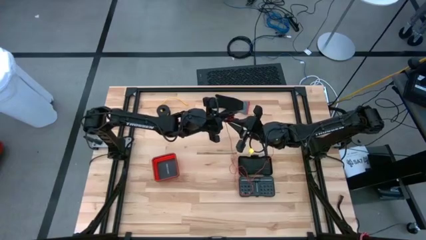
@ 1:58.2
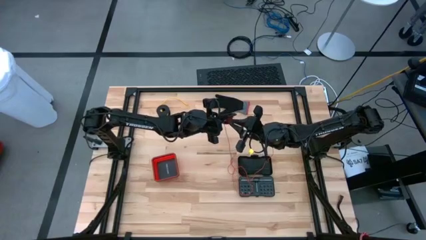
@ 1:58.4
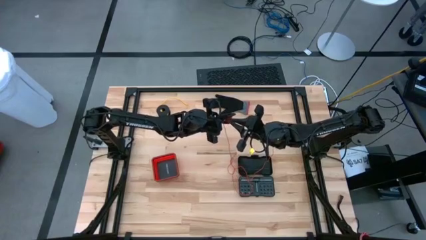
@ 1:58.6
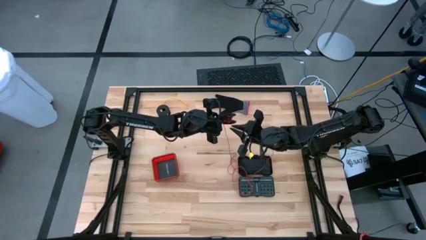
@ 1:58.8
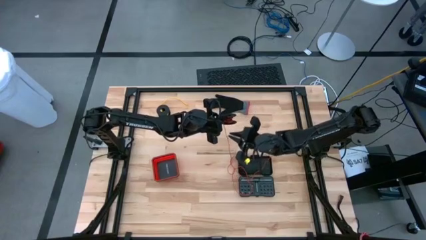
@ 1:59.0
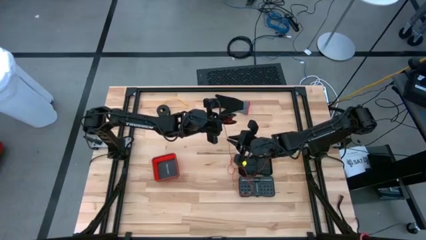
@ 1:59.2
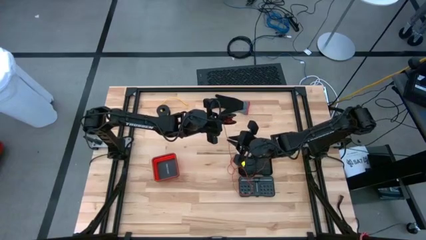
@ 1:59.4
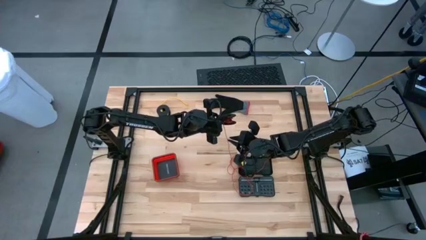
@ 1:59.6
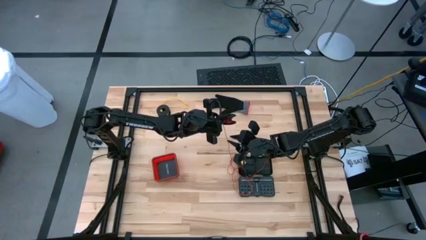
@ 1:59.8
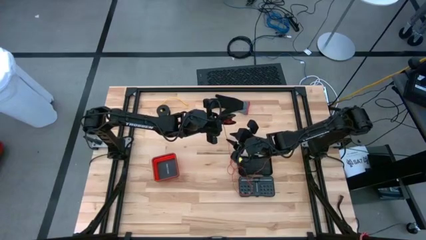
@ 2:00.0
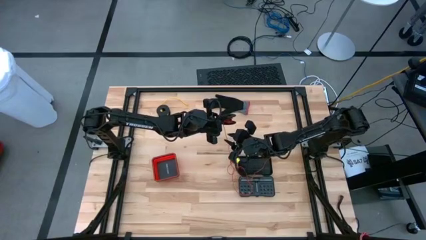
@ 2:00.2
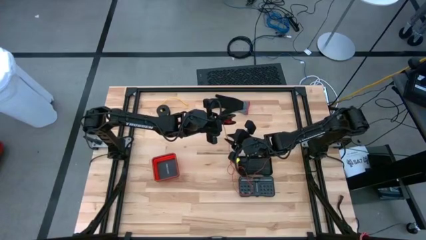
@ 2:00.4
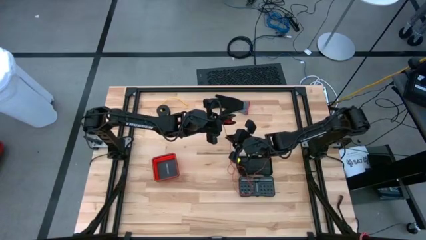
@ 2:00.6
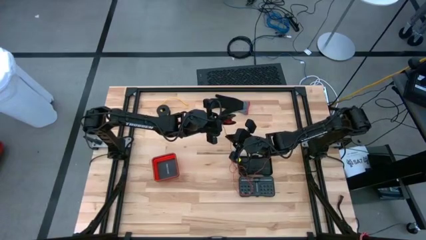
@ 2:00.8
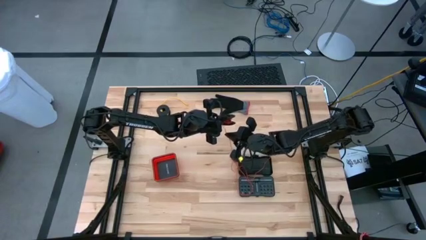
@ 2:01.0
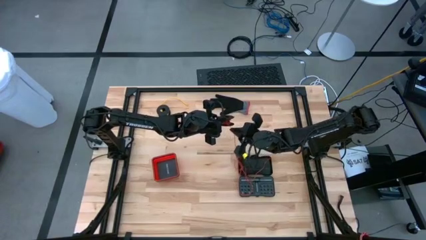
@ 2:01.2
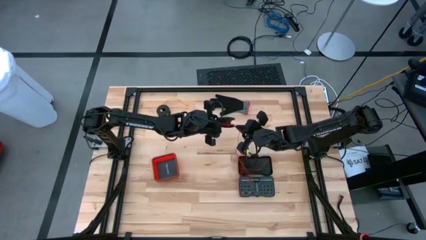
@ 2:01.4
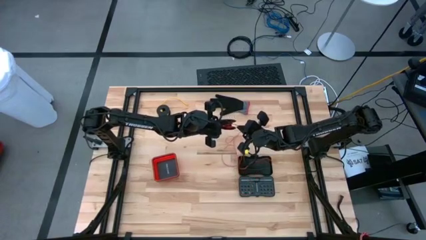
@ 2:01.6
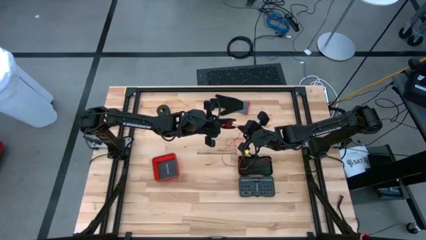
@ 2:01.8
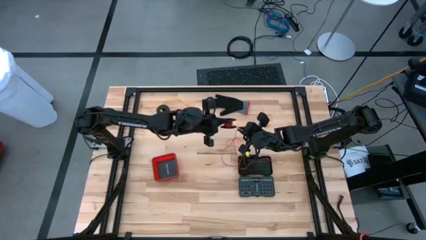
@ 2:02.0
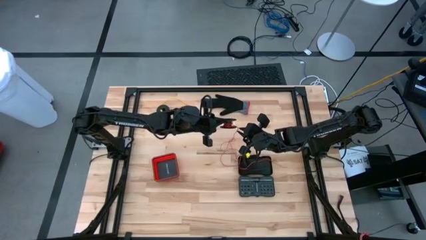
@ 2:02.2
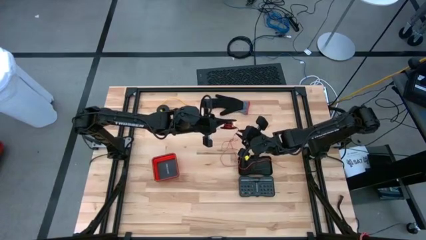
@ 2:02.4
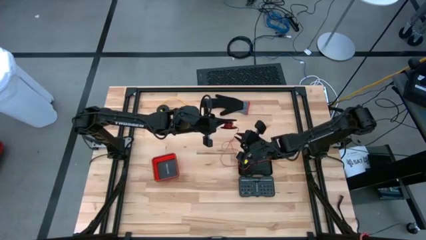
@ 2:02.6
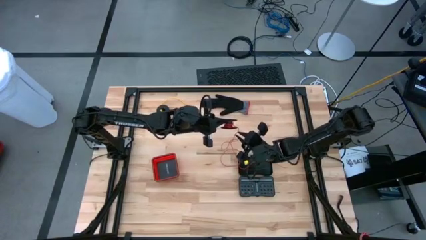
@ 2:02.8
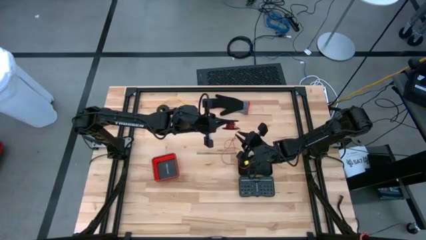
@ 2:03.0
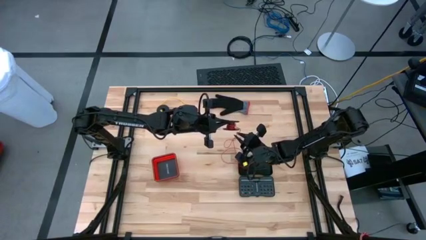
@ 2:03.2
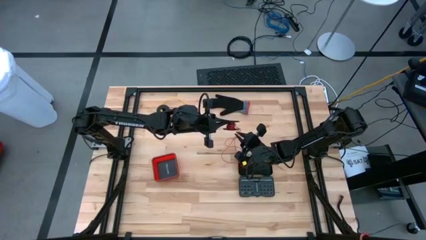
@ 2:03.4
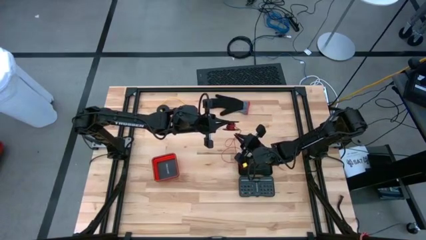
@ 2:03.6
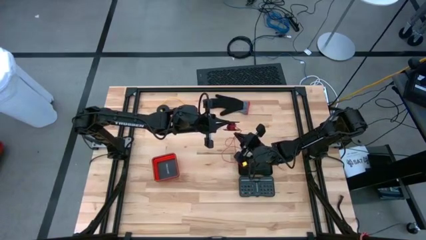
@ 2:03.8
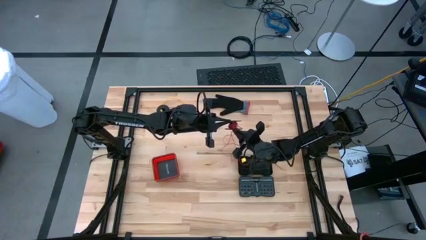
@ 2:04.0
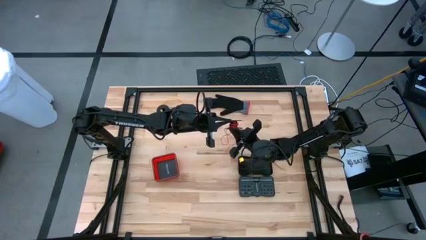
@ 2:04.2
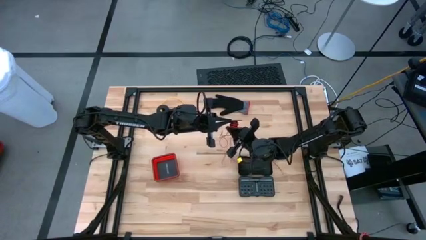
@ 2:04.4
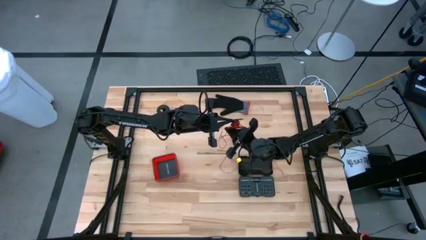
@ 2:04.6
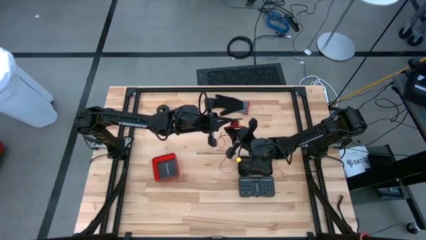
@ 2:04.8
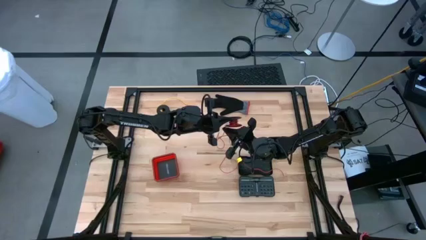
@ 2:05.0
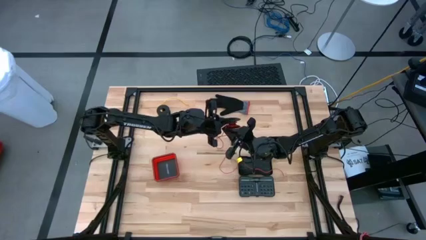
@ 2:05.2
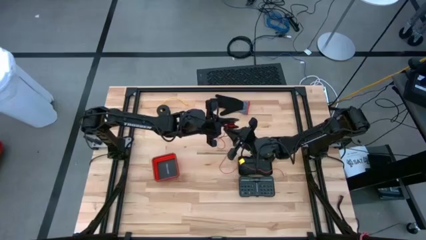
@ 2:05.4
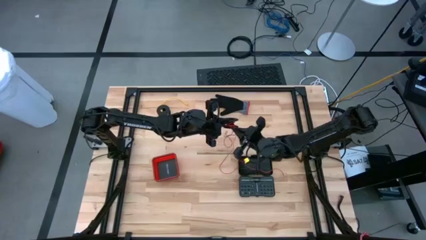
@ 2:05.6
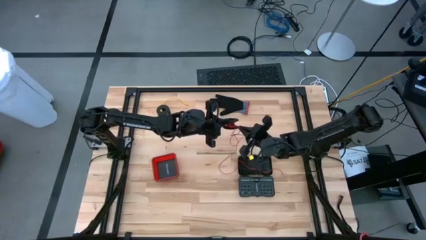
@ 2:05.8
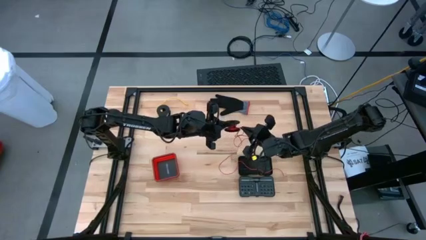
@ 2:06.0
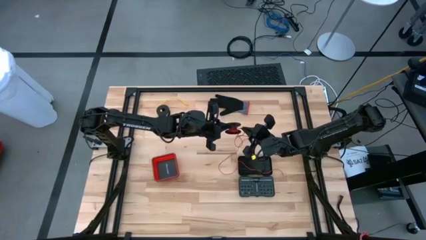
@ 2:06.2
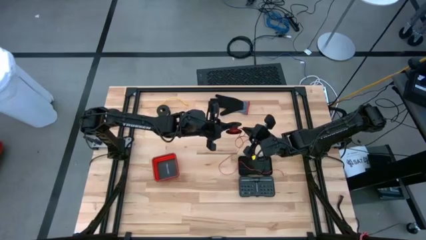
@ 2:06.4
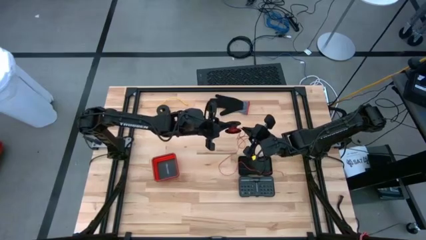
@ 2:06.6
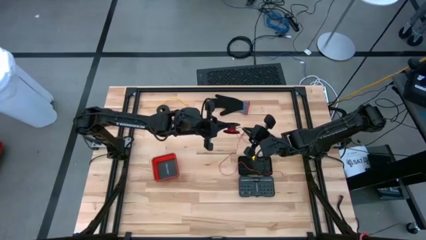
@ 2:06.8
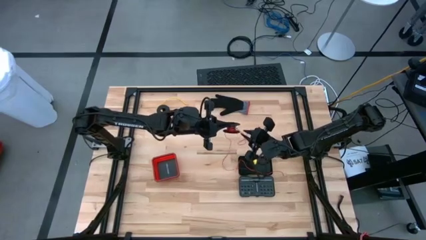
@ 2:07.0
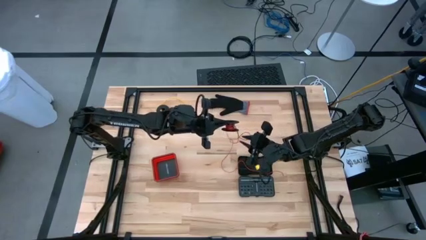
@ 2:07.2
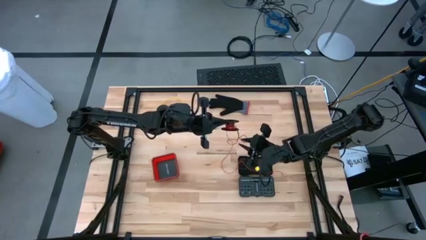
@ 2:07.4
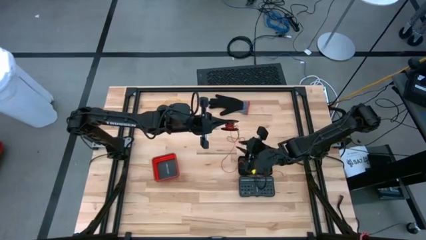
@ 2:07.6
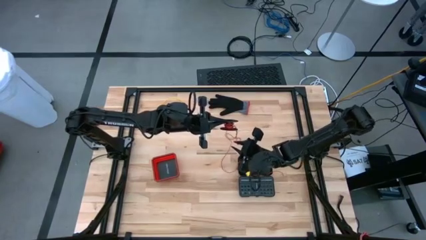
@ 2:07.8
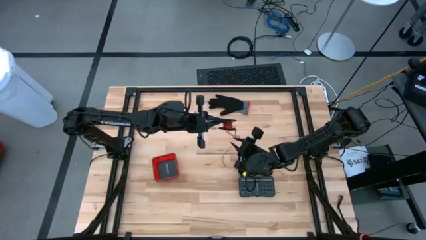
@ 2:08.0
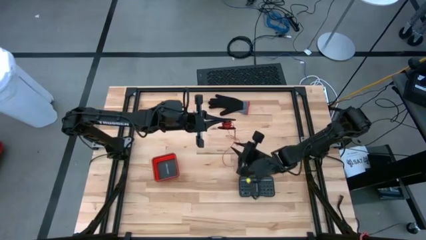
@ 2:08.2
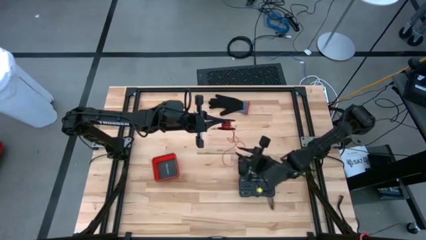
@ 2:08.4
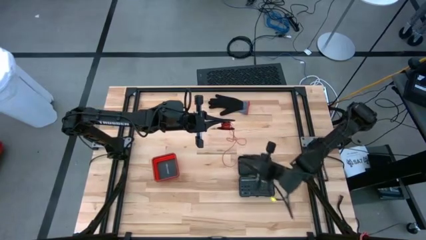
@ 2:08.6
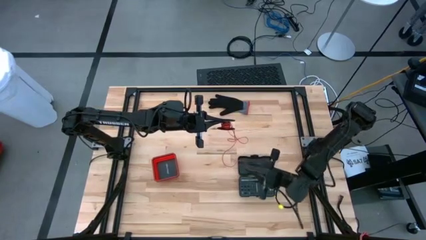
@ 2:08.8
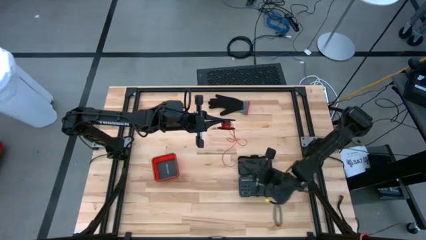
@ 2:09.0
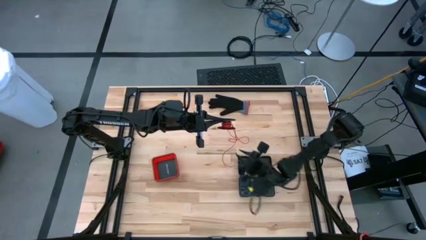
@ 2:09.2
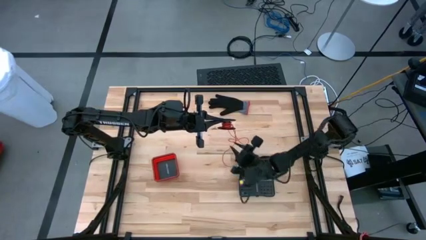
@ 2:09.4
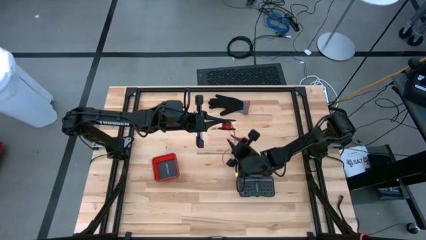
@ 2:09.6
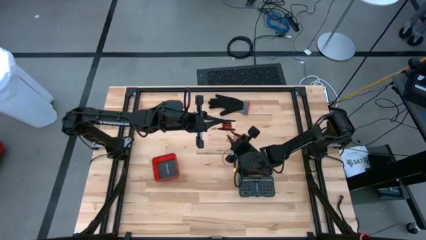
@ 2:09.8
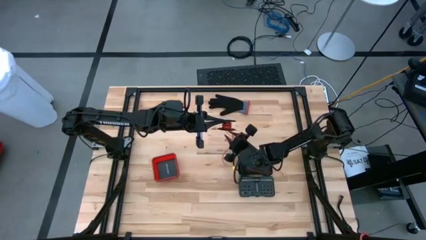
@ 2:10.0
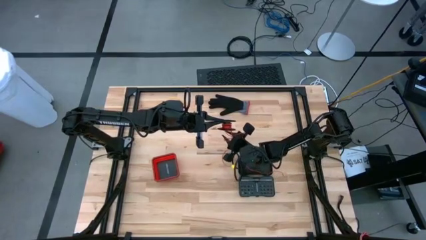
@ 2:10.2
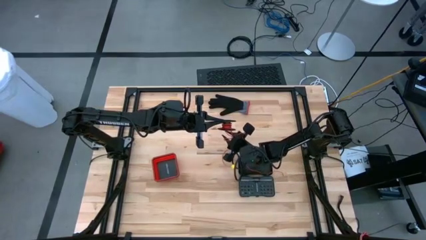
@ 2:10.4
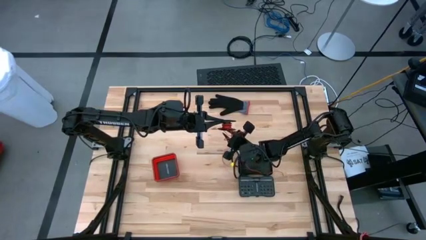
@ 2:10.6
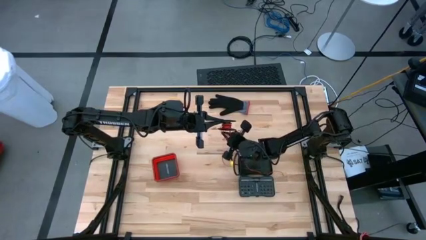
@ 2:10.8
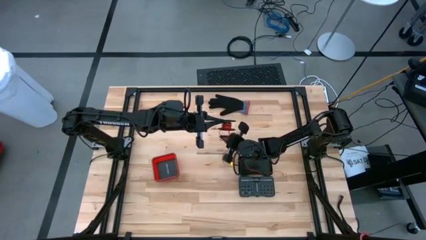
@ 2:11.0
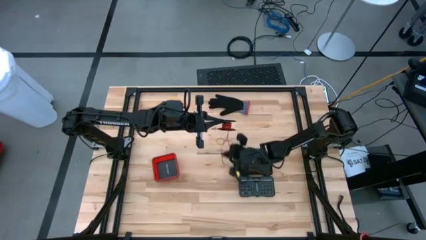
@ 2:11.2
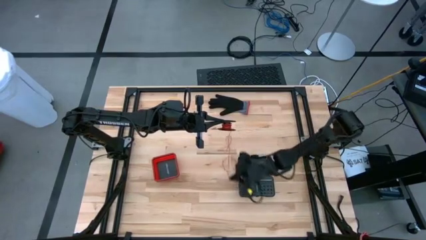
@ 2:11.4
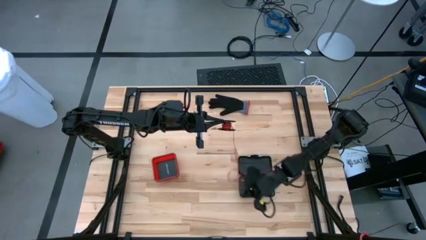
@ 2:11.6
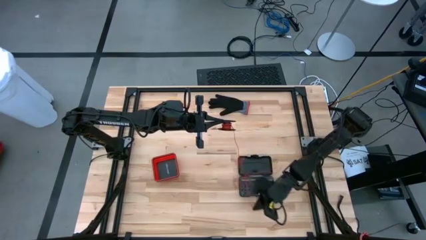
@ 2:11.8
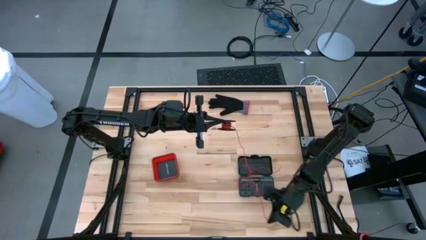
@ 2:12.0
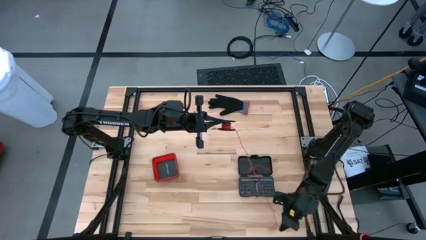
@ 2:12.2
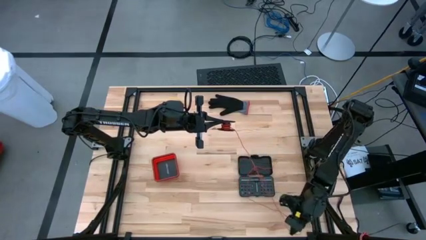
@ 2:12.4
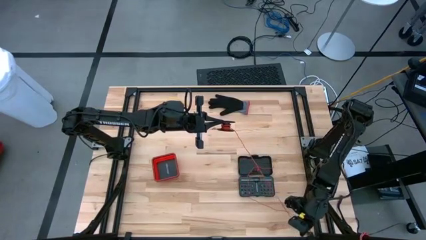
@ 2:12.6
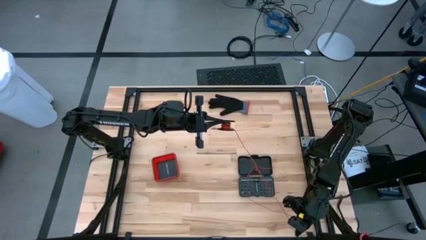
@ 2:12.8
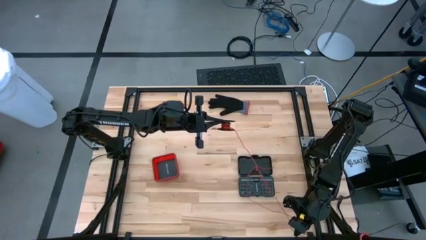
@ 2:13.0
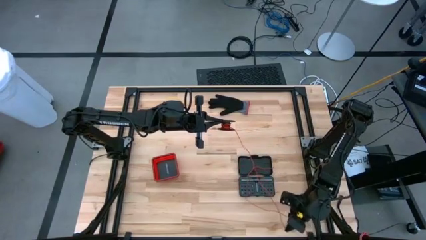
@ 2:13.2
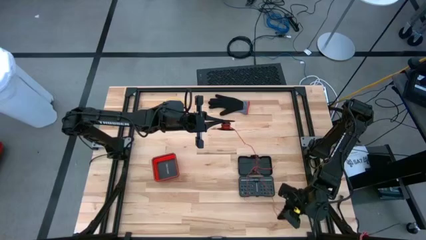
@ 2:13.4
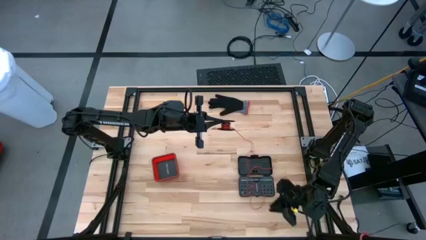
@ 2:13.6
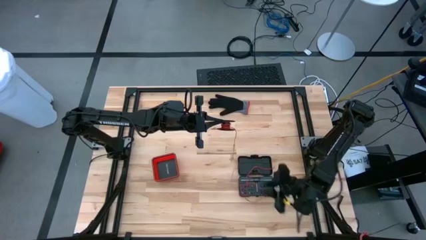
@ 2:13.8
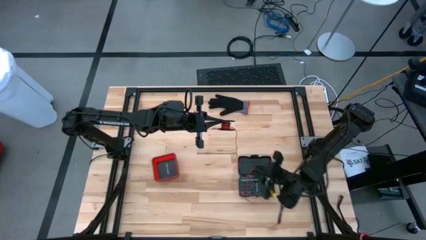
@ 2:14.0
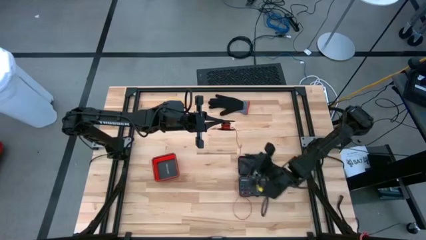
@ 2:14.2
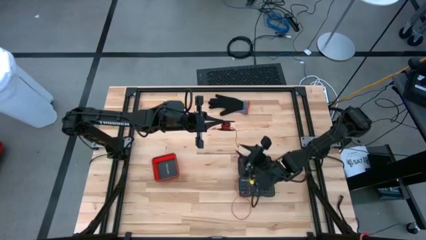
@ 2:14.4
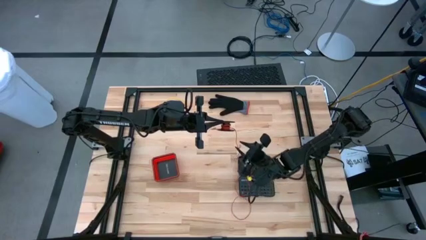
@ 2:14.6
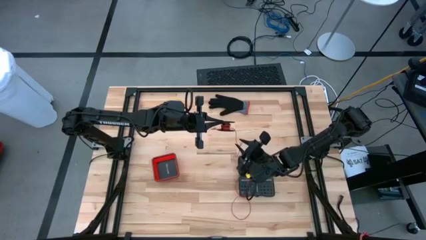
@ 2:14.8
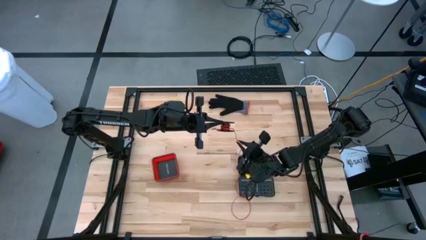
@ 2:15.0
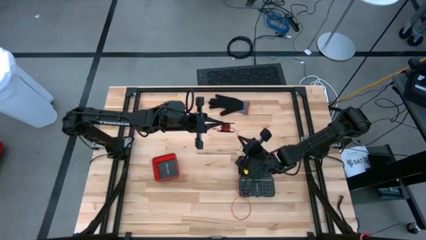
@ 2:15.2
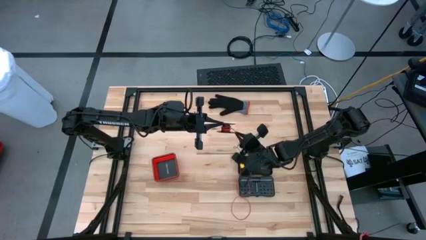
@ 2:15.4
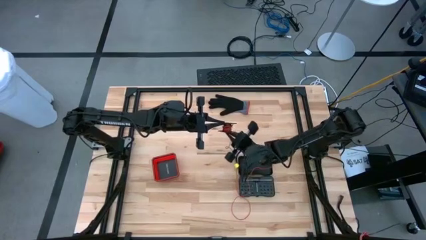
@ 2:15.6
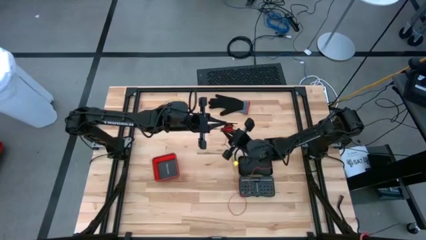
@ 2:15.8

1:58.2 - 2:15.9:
Task: Coil cords
Coil the red wire onto the spool
